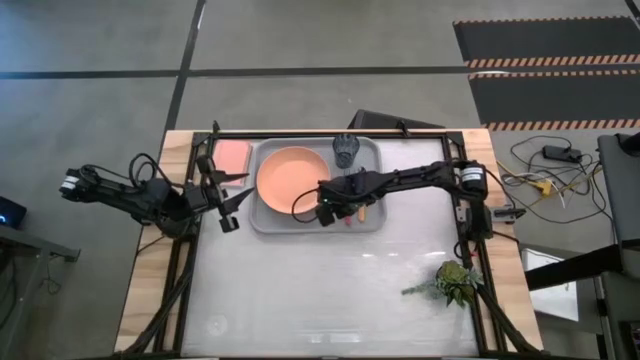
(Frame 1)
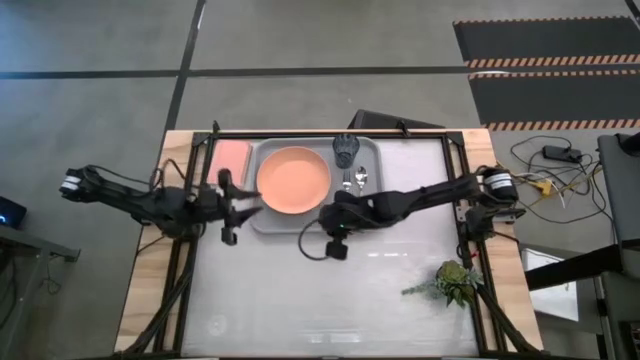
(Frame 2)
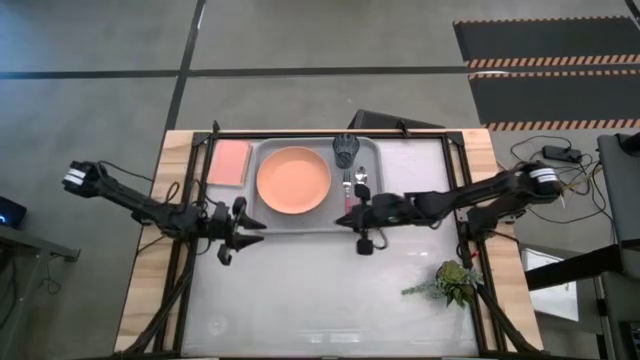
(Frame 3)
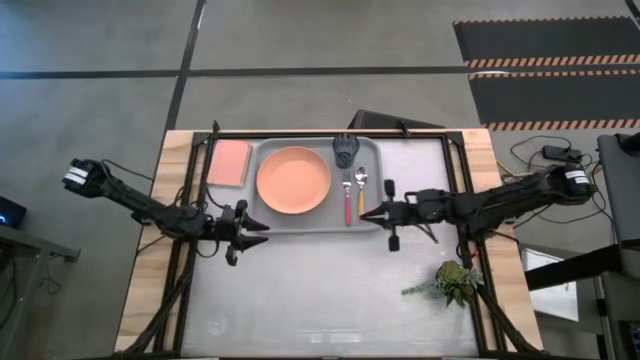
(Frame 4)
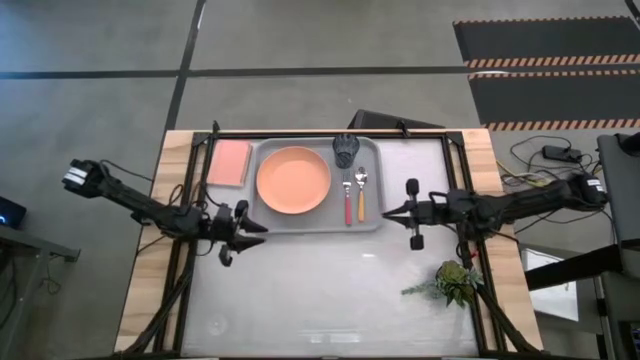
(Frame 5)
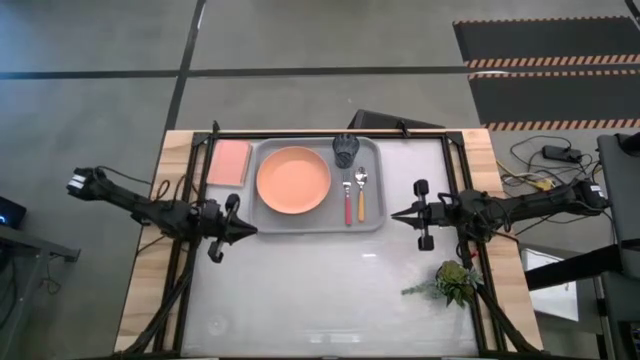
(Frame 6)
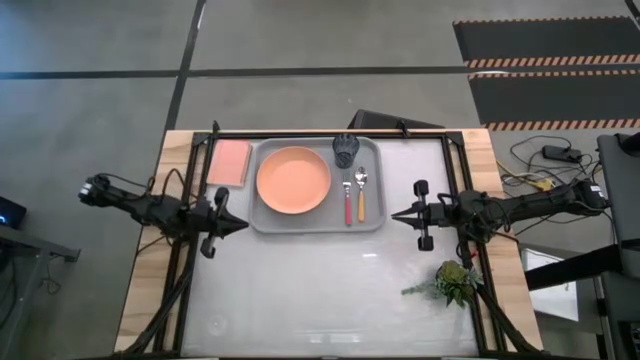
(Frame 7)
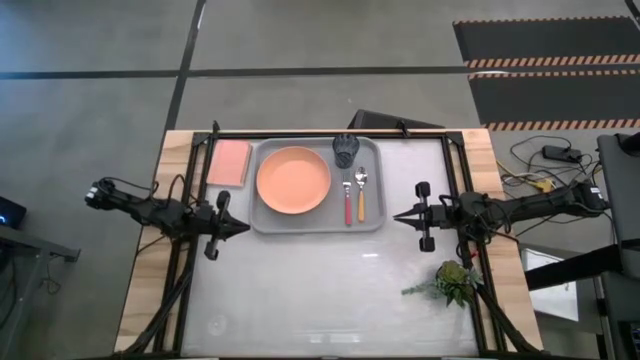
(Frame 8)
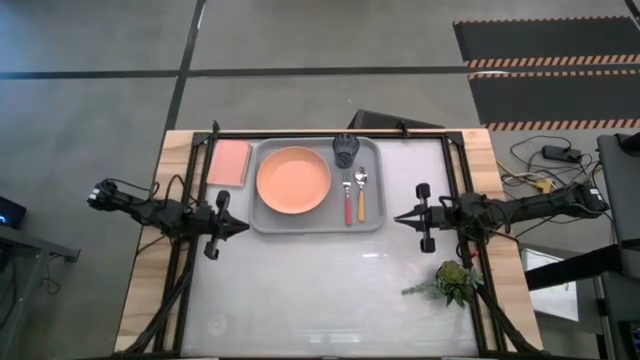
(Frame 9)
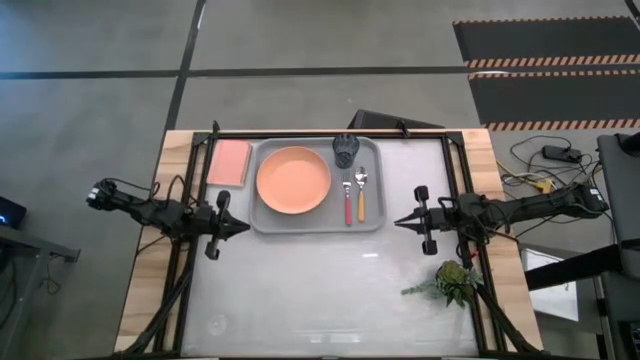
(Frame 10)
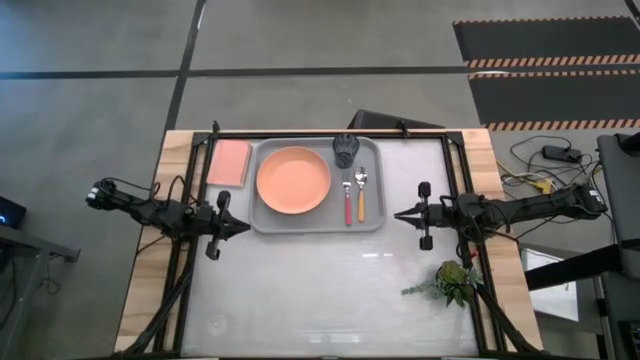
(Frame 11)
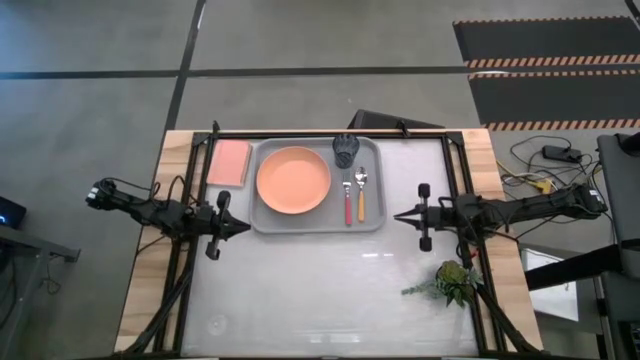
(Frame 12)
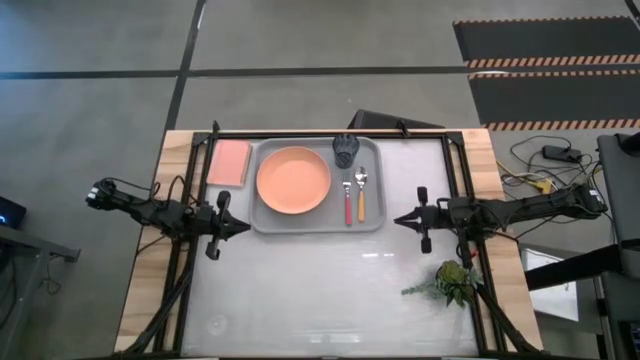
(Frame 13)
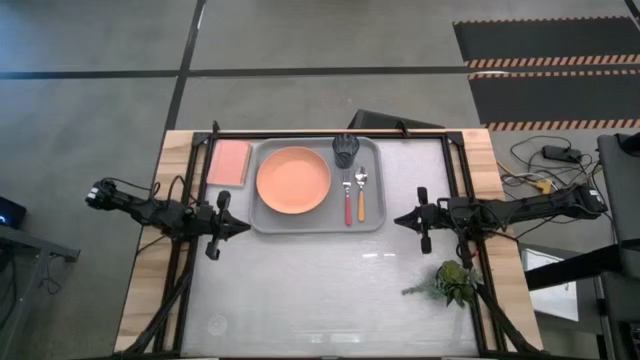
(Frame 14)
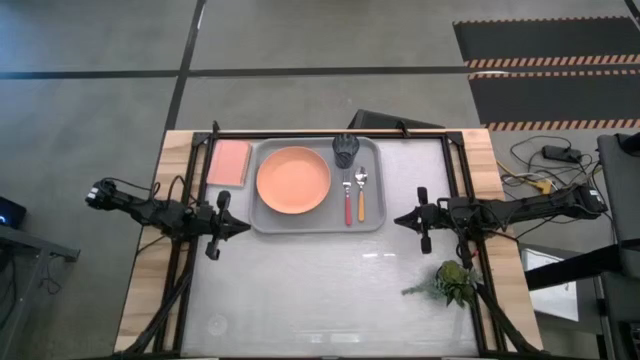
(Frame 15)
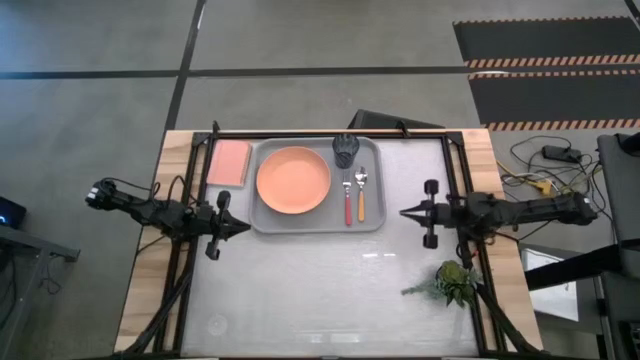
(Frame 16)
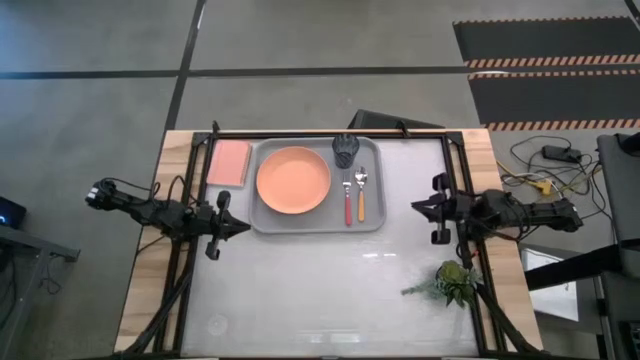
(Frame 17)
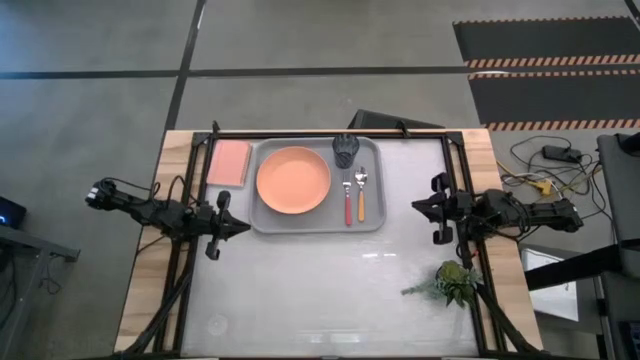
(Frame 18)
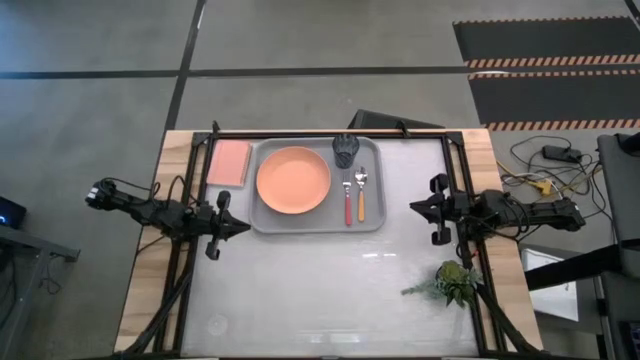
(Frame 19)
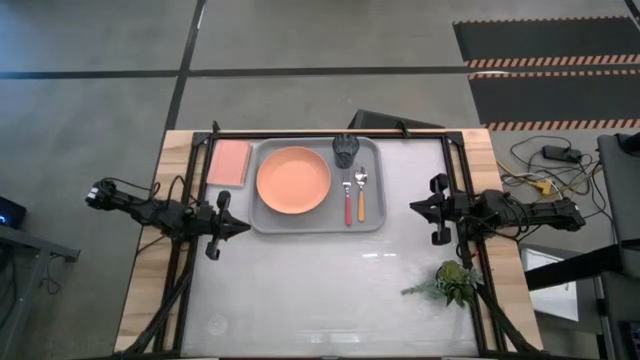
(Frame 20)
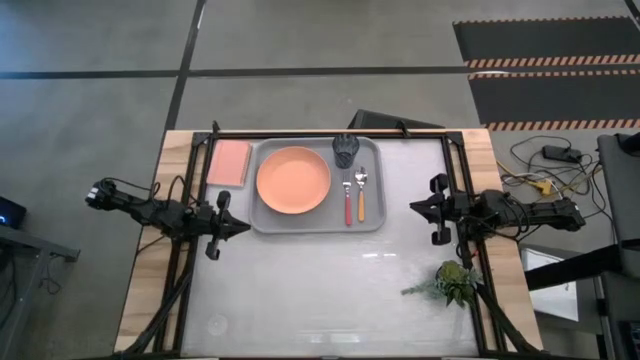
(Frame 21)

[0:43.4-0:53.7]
Task: Pick and place plate/cup/fork/spoon on tray
Return to Home Position

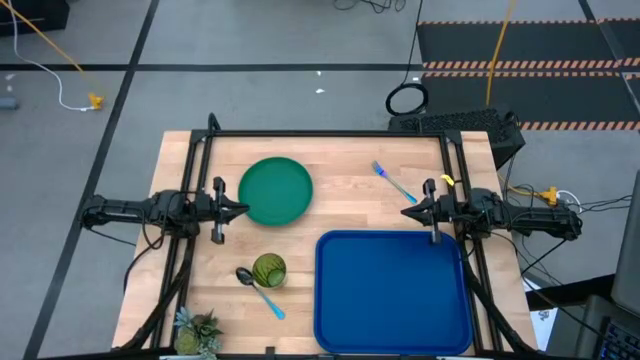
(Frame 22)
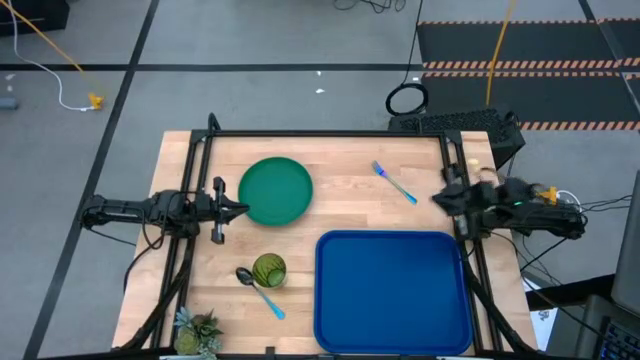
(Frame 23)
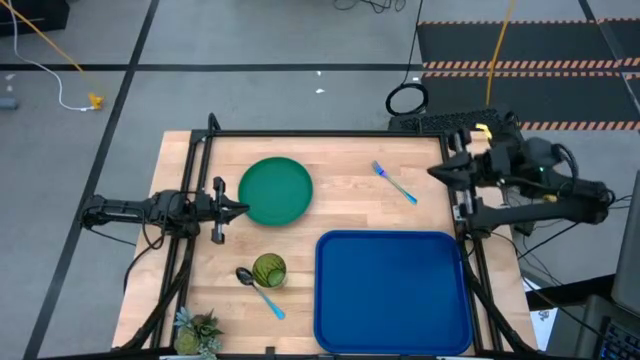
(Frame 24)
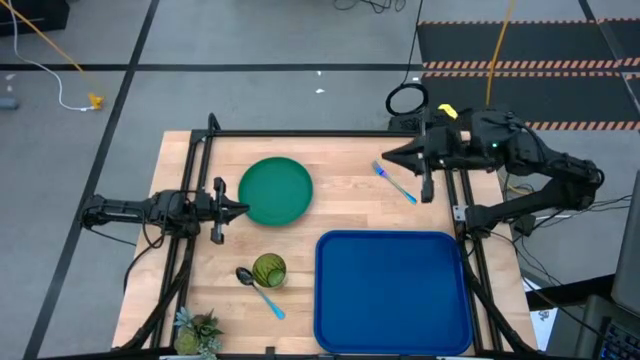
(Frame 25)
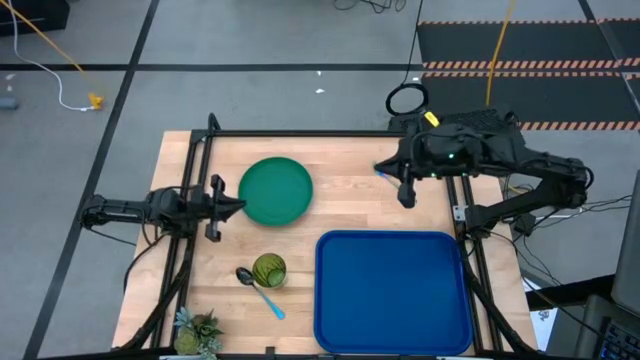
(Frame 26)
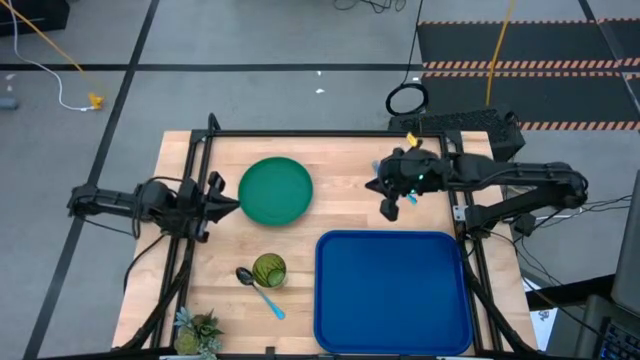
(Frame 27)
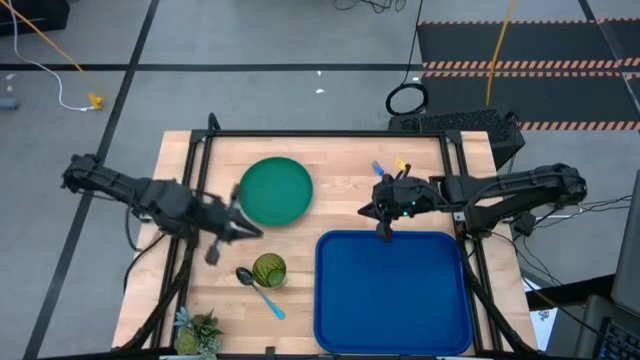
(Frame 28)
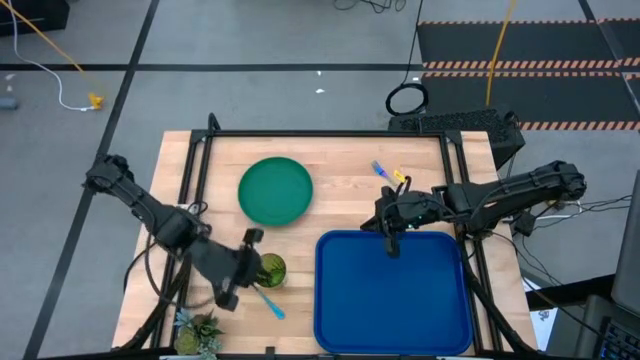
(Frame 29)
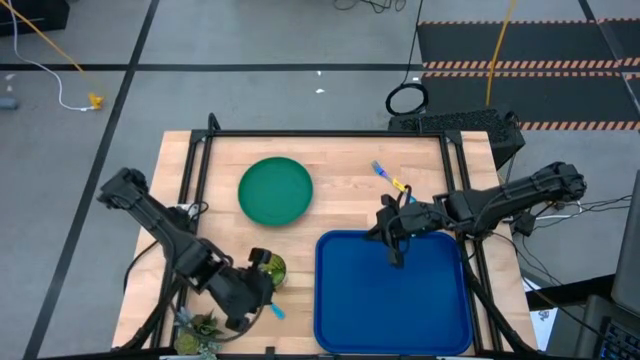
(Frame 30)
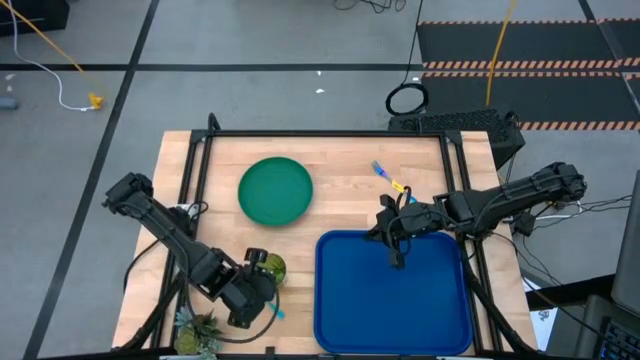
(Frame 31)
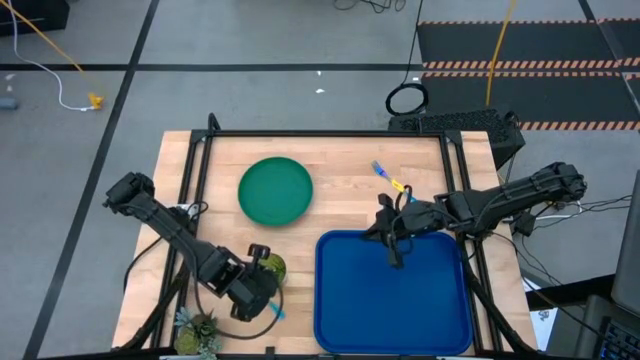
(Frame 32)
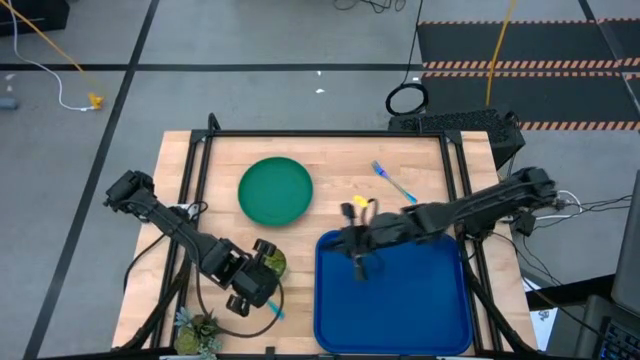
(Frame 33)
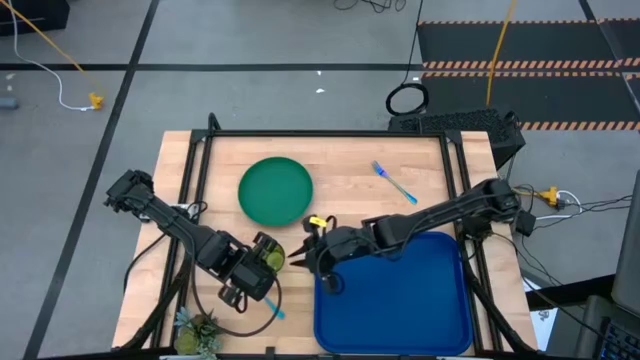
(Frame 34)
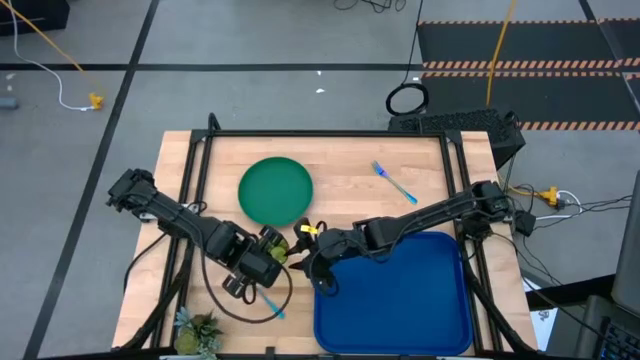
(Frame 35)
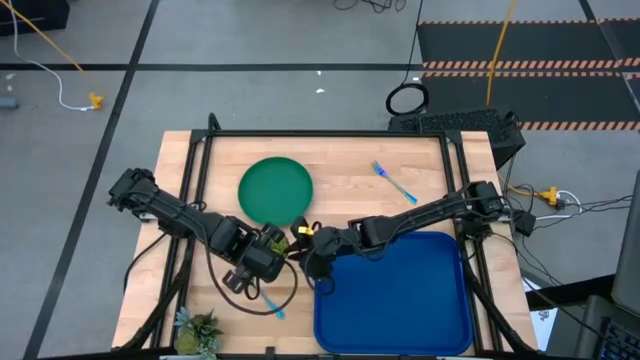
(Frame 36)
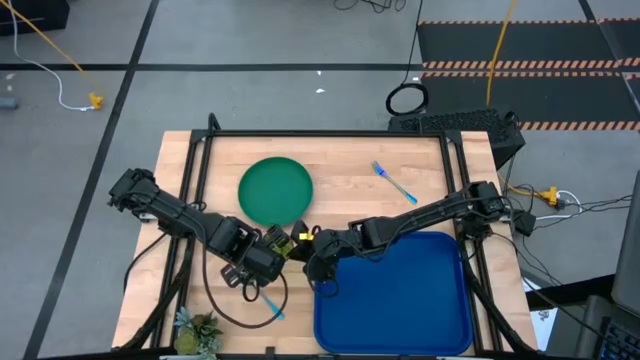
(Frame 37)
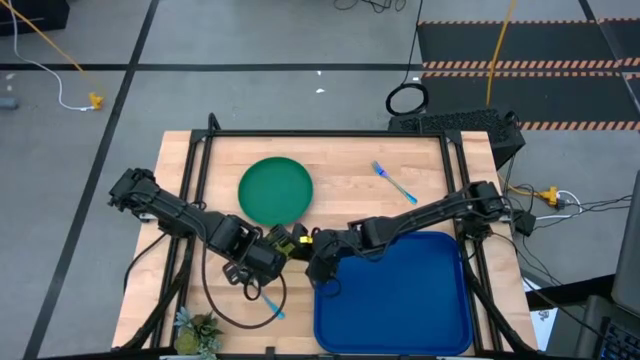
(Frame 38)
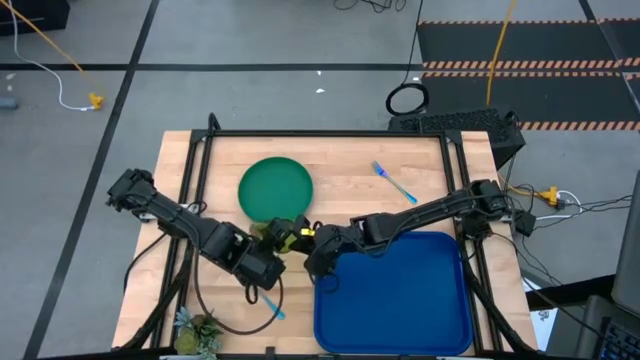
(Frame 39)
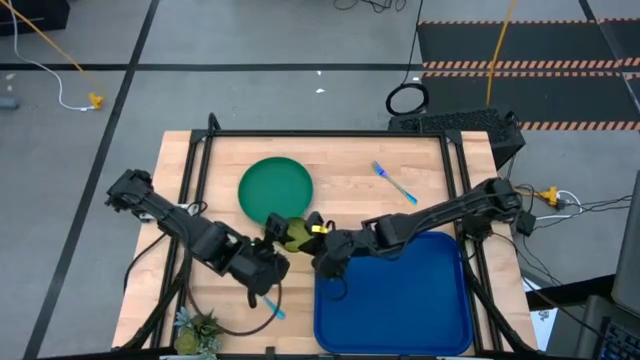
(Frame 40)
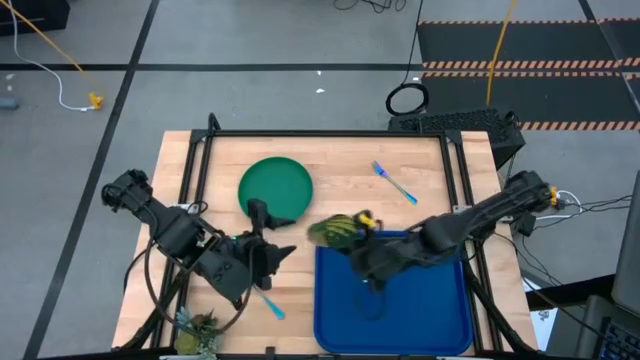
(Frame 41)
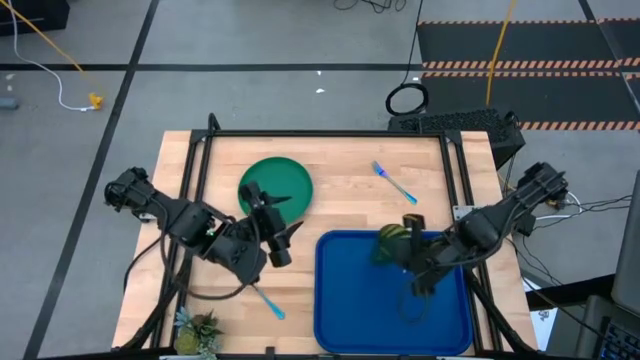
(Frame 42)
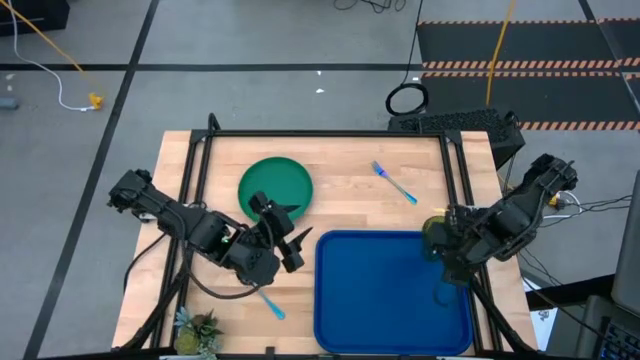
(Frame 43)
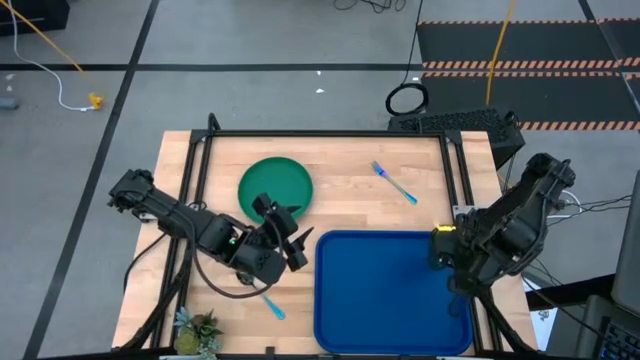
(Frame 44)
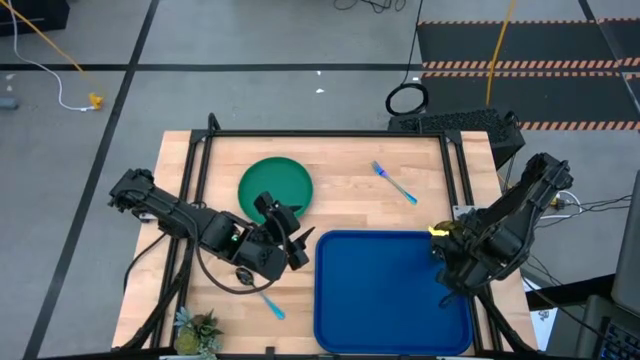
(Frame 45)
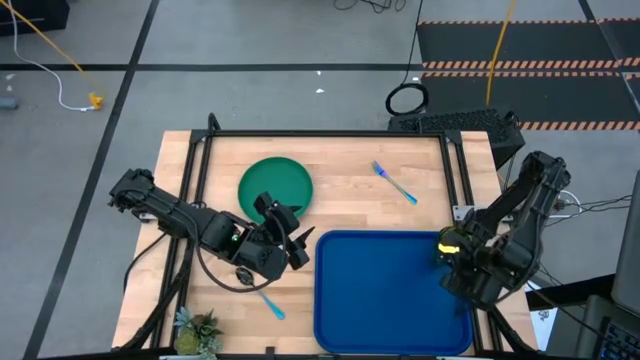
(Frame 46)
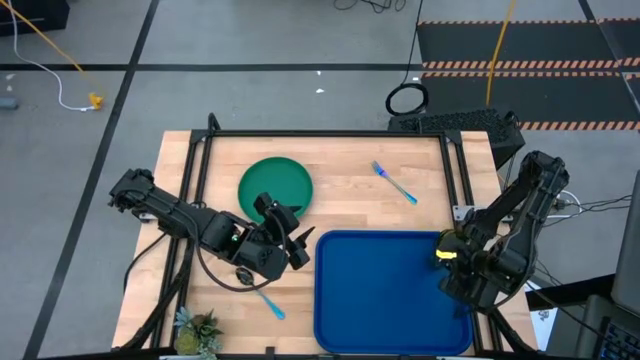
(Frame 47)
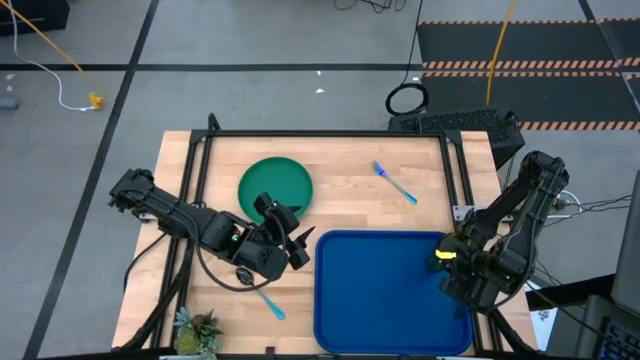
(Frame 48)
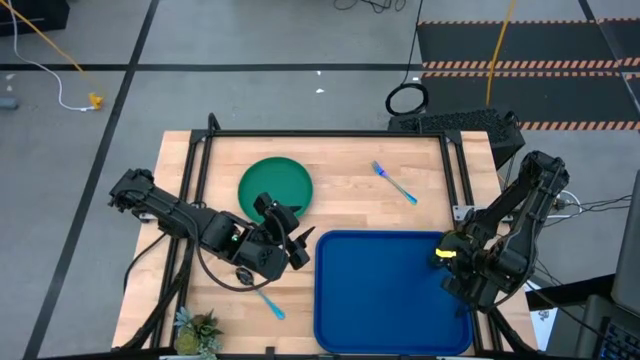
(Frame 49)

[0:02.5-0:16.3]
Task: Pick and place plate/cup/fork/spoon on tray
Put the green cup in the top right corner of the blue tray
